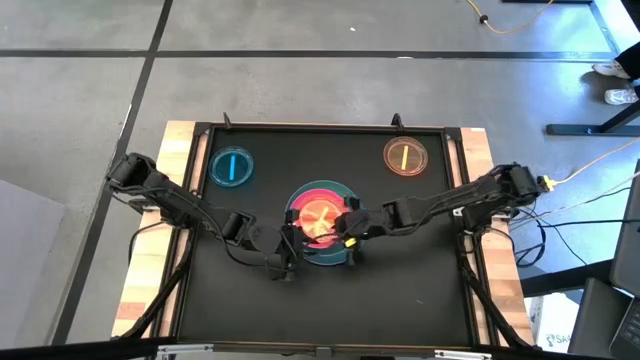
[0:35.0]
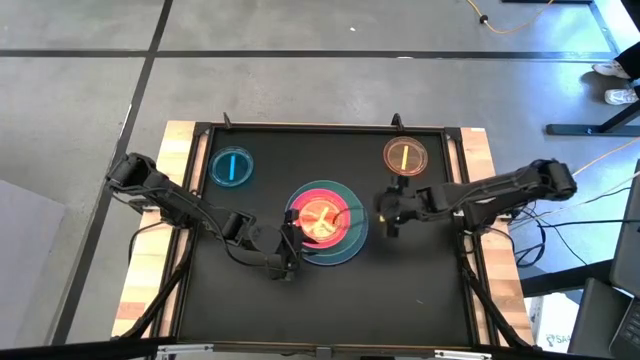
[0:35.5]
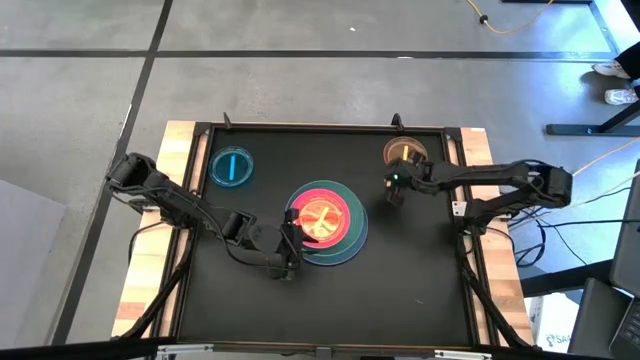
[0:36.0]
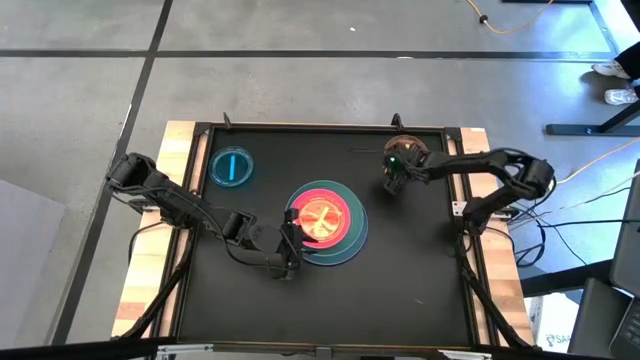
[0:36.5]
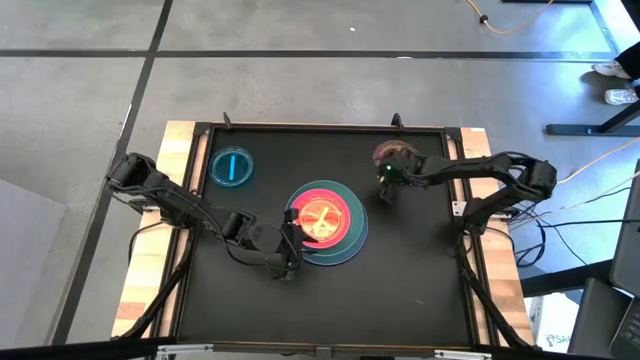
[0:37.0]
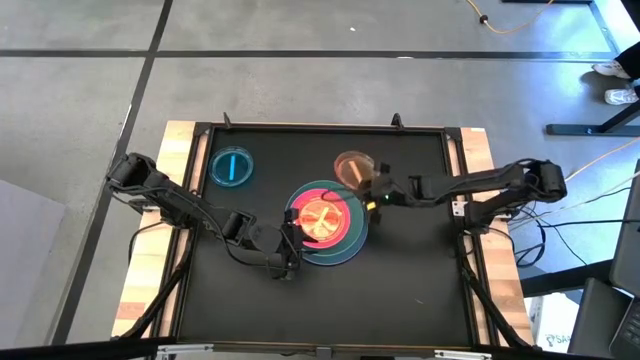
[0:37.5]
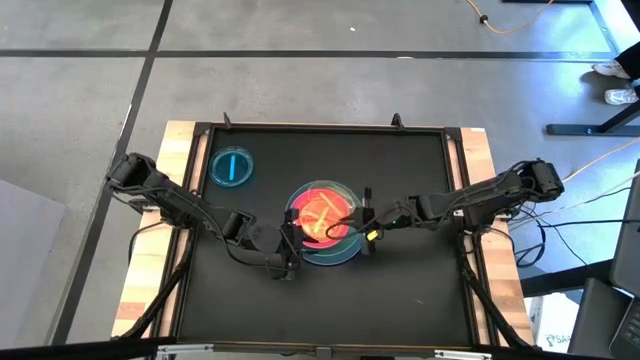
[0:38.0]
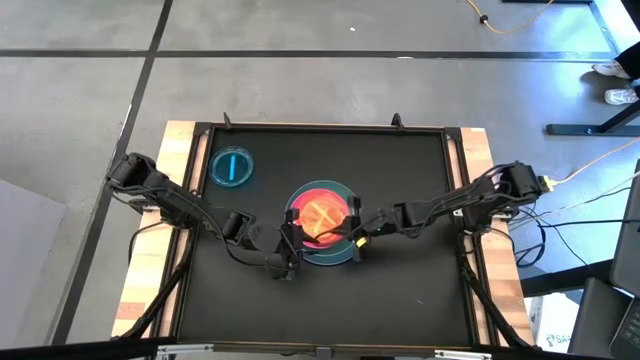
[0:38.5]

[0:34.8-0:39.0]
Task: Stack plastic plates
Stack the light orange plate on the light orange plate

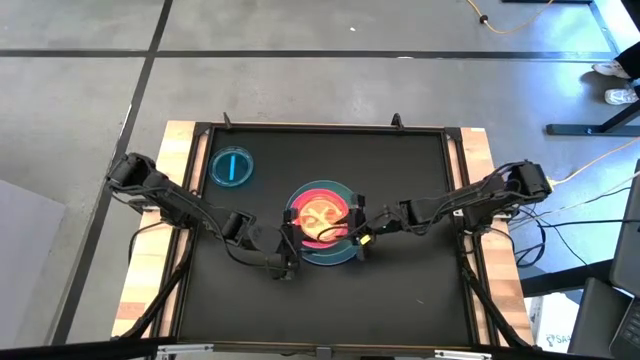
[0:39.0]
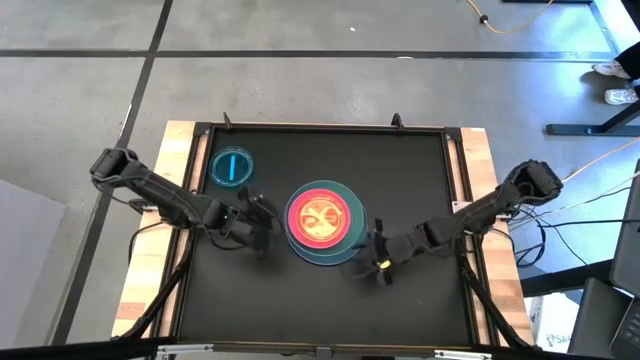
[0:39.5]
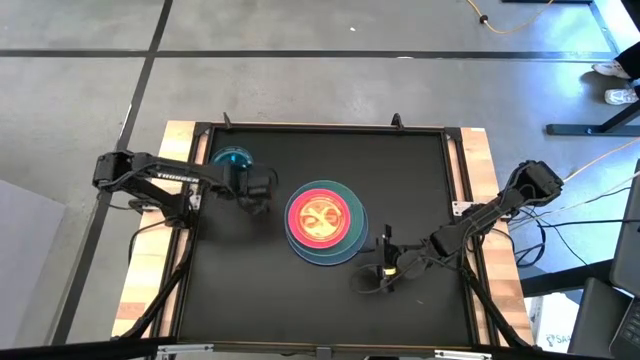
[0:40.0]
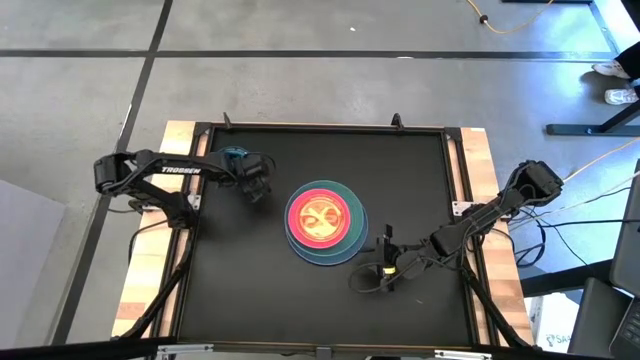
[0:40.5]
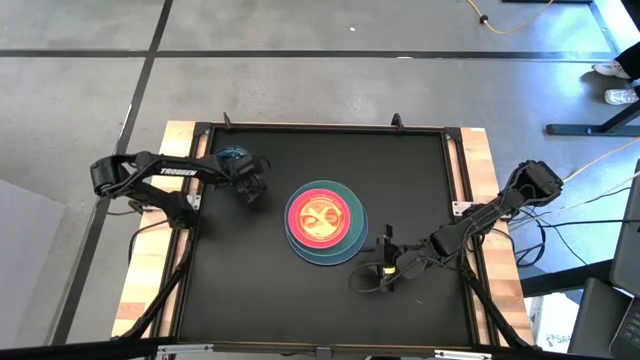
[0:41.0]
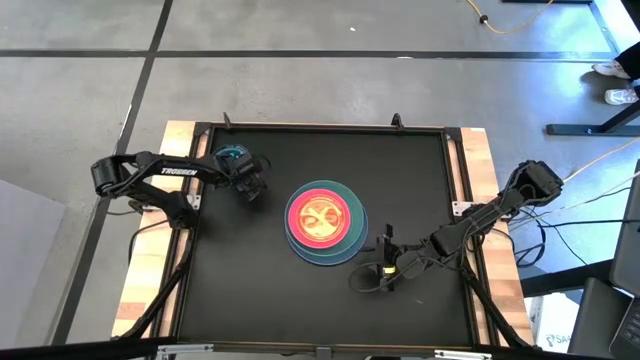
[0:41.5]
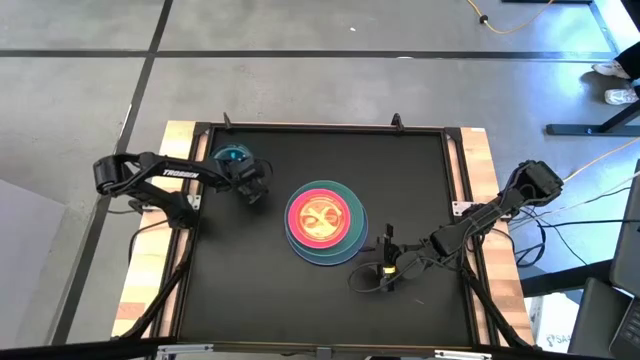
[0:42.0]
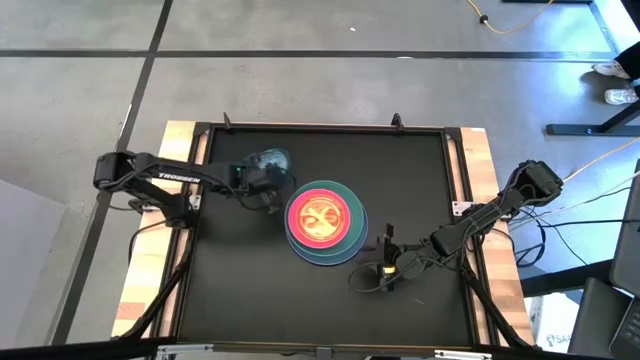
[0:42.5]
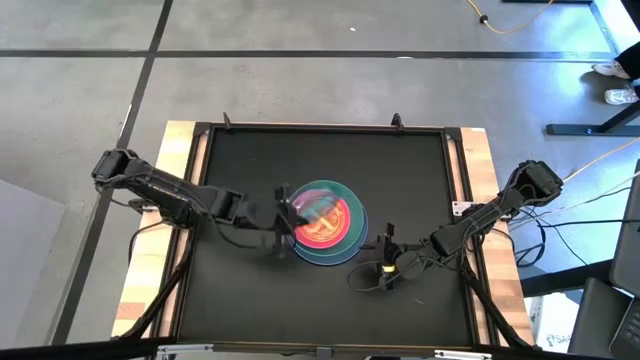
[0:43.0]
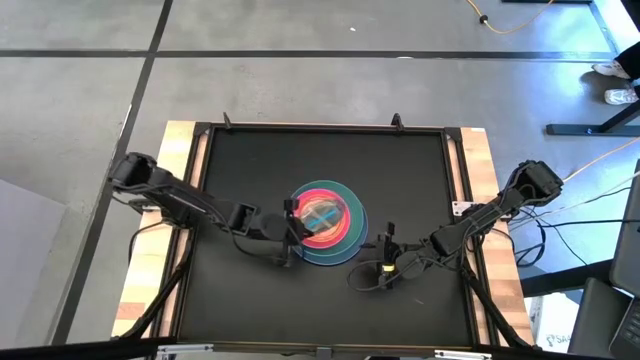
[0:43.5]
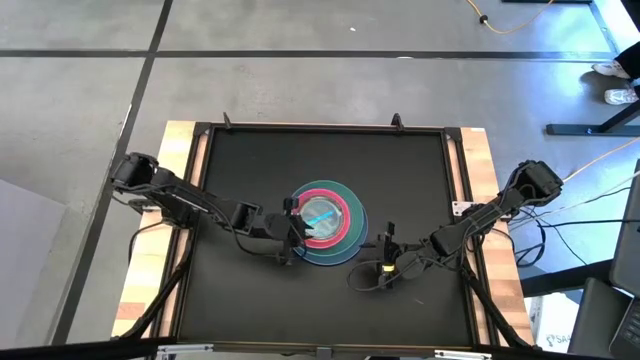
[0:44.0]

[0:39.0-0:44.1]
Stack the light blue plate on the light orange plate

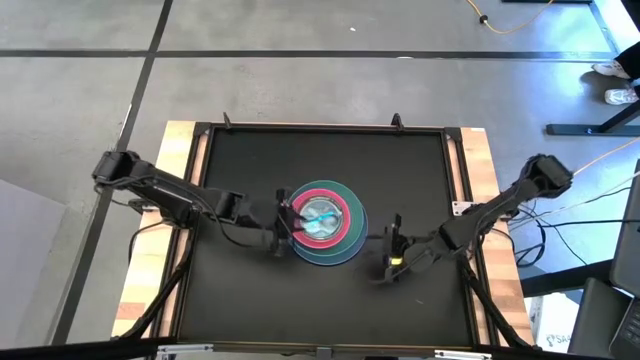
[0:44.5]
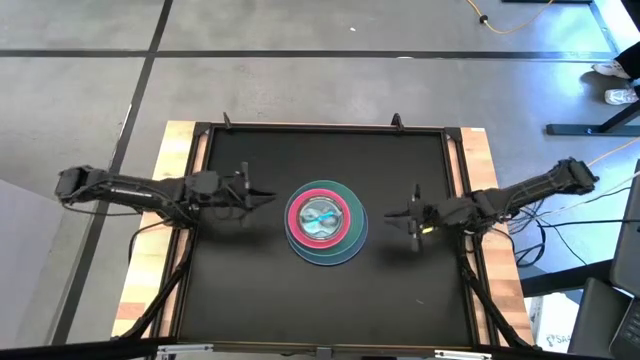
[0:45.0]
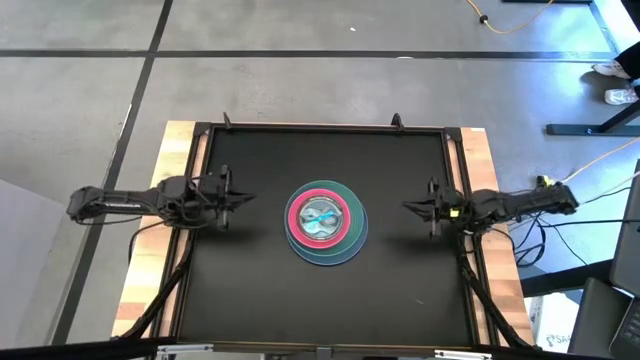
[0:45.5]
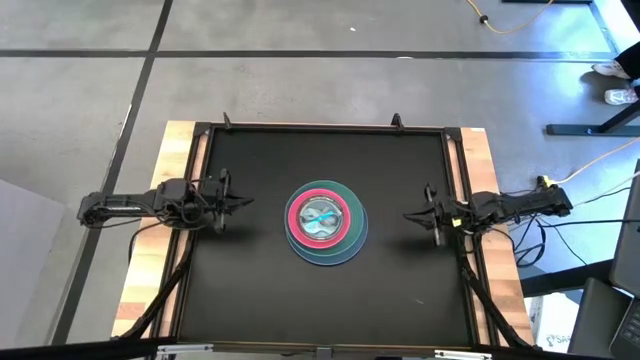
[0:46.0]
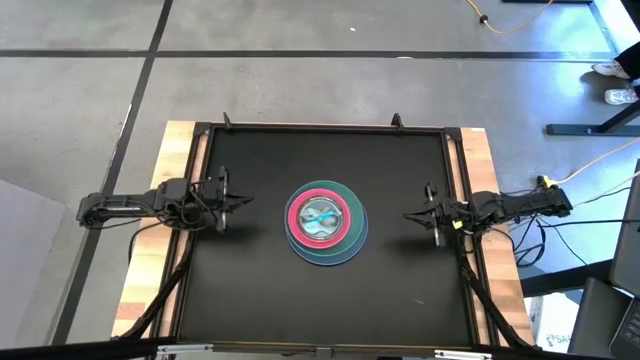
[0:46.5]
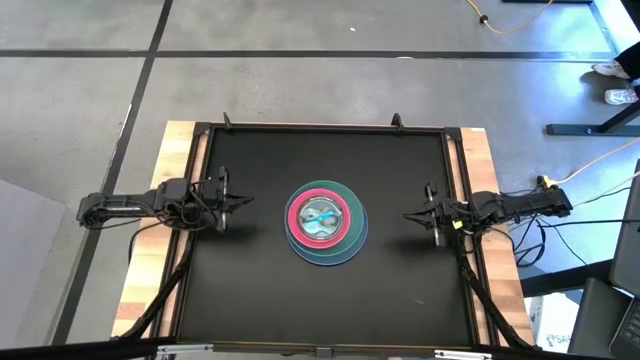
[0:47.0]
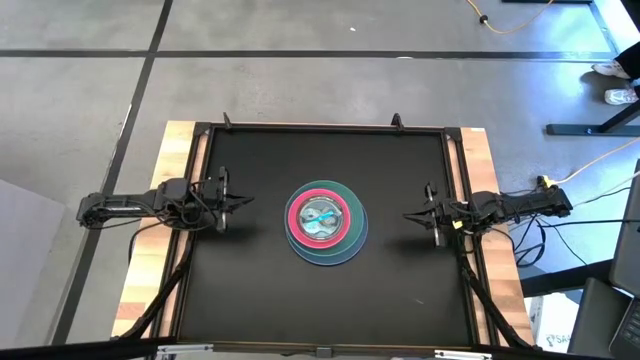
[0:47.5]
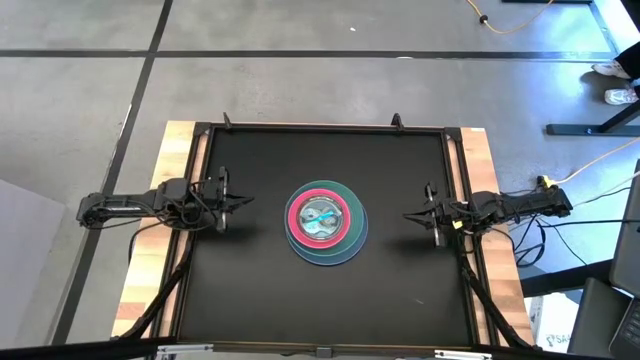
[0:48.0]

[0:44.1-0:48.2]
Return to Home Position

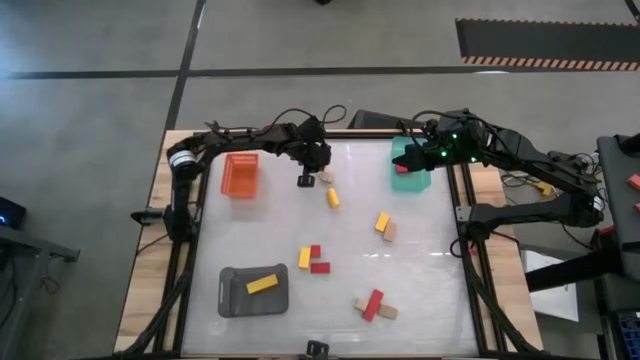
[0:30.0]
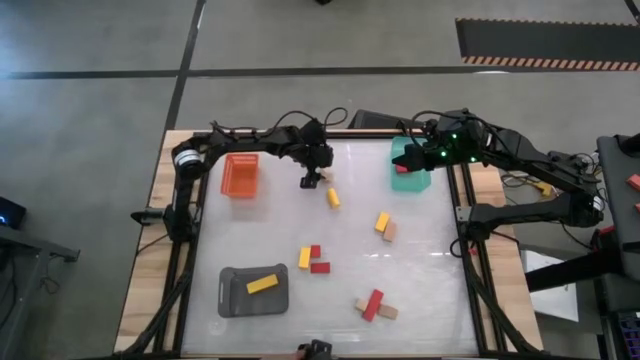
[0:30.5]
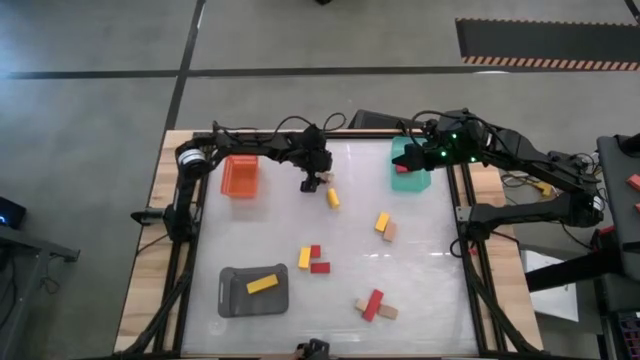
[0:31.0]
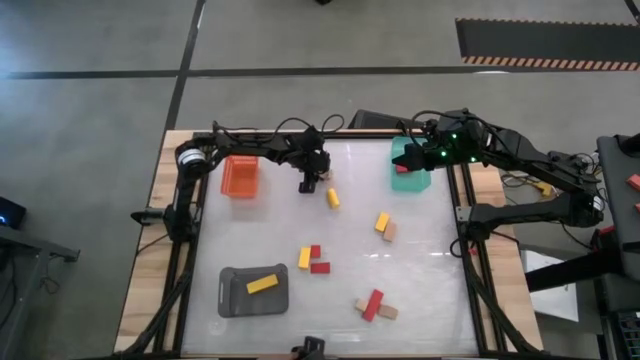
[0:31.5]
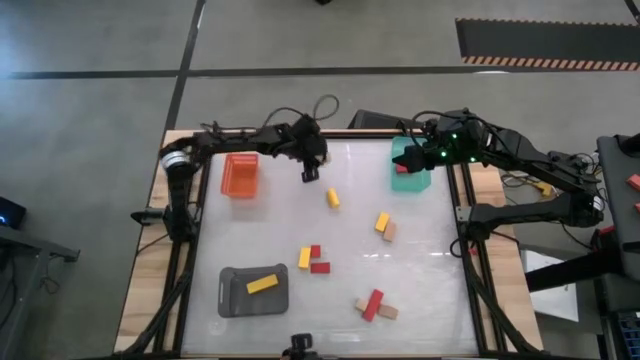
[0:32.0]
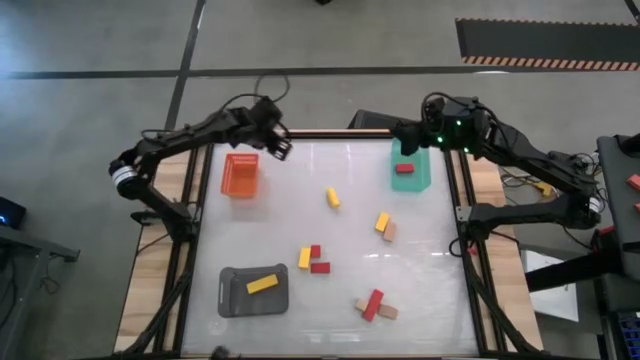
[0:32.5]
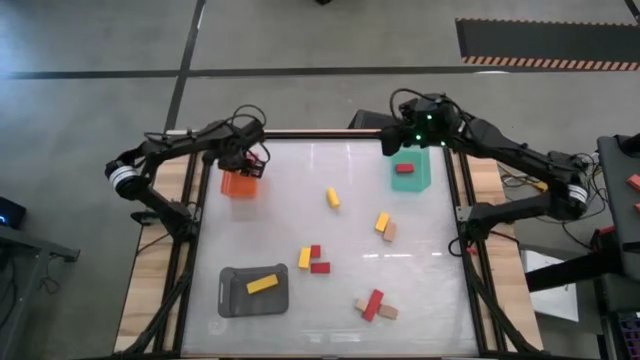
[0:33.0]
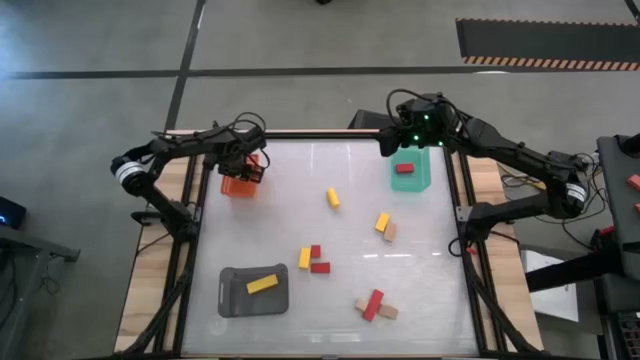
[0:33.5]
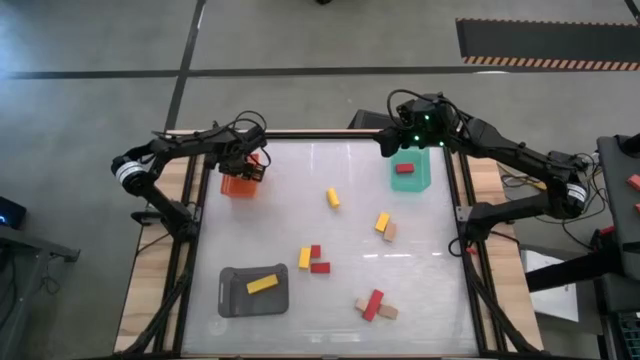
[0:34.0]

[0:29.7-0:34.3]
Task: Sort & place blocks by color
Put the brown block into the orange bin
